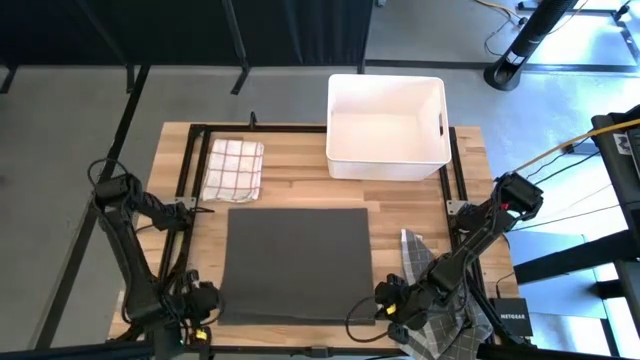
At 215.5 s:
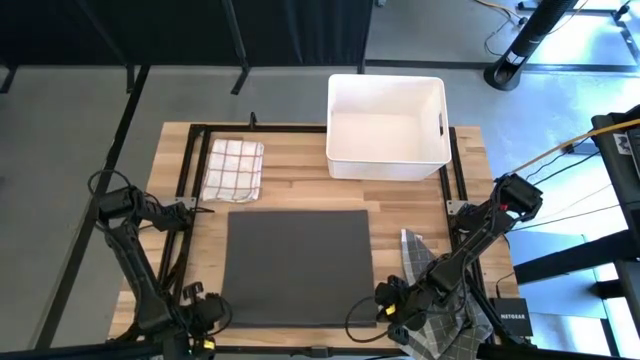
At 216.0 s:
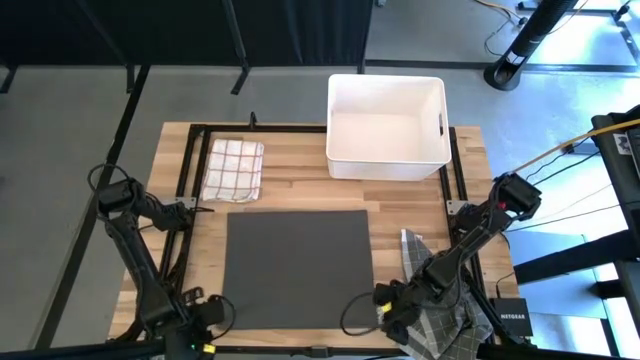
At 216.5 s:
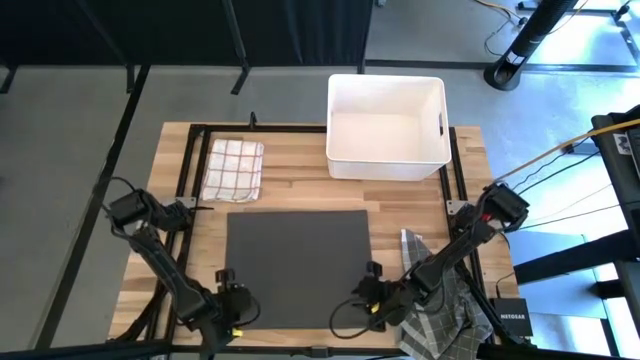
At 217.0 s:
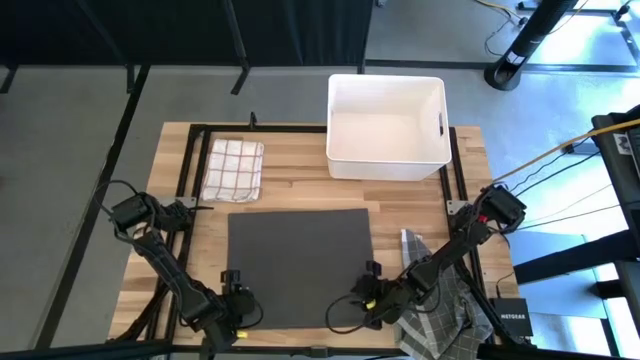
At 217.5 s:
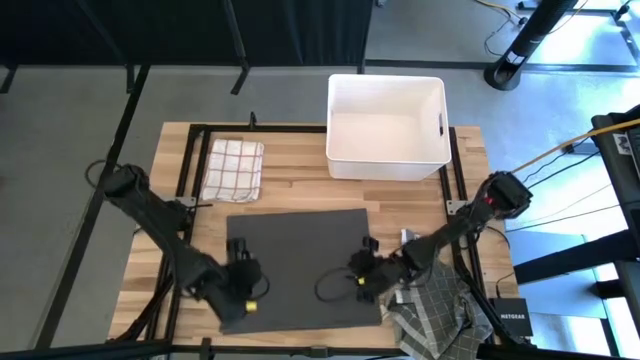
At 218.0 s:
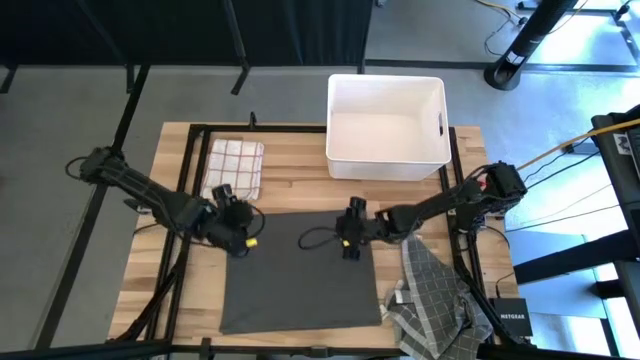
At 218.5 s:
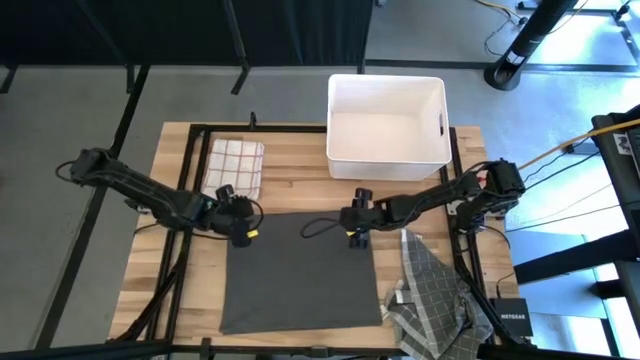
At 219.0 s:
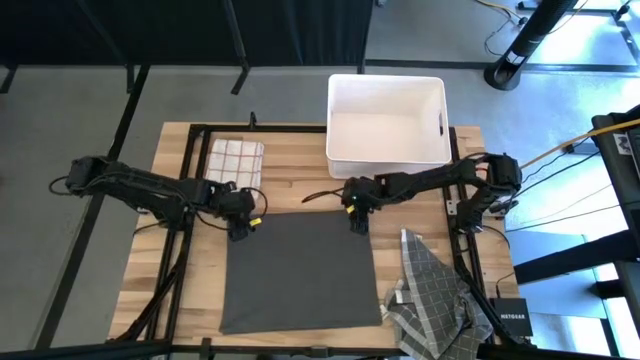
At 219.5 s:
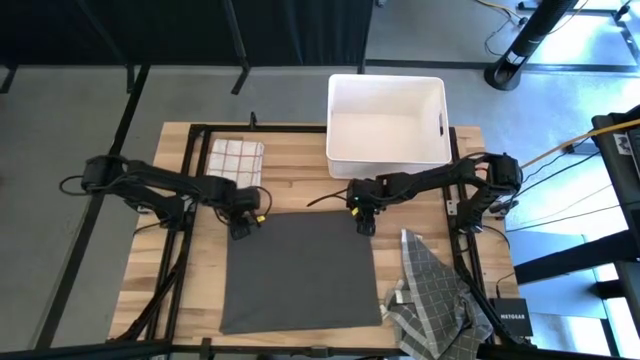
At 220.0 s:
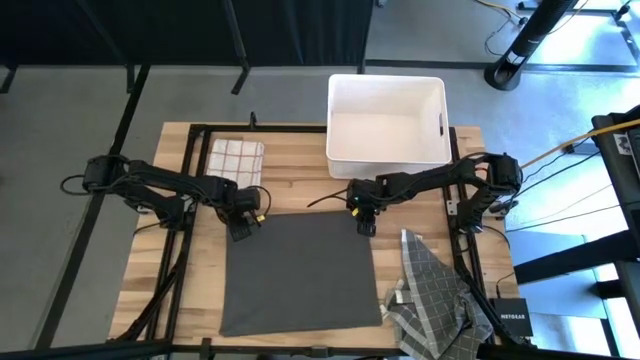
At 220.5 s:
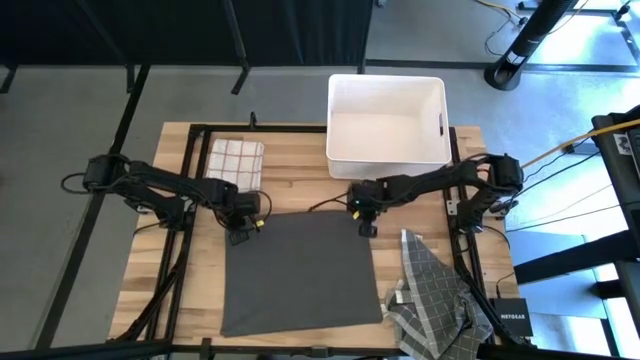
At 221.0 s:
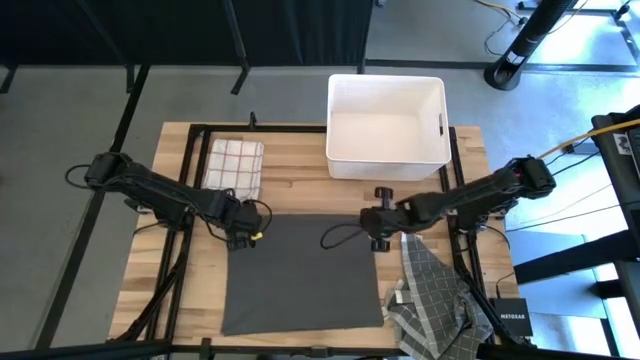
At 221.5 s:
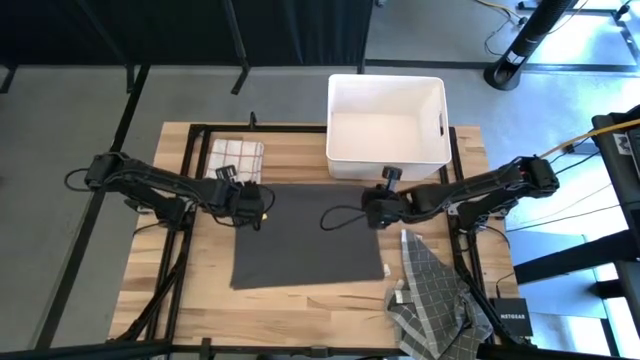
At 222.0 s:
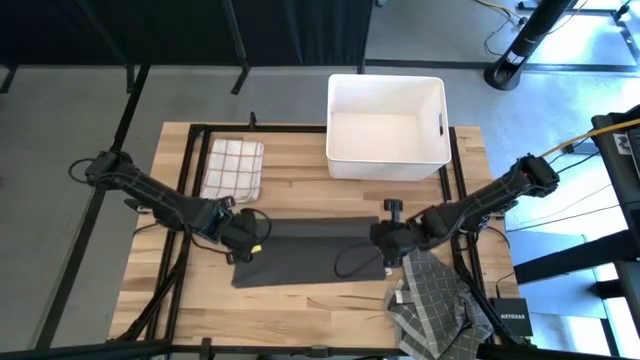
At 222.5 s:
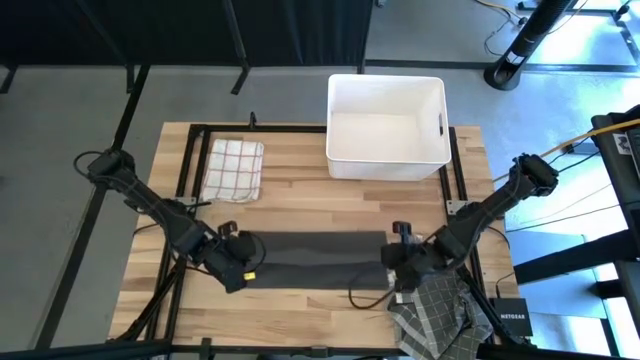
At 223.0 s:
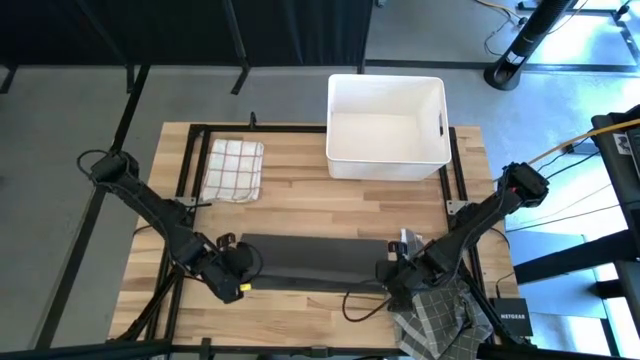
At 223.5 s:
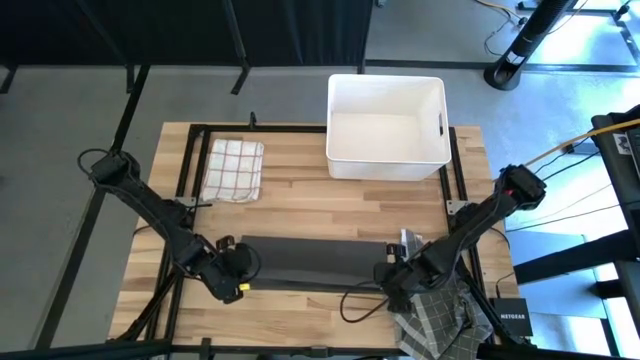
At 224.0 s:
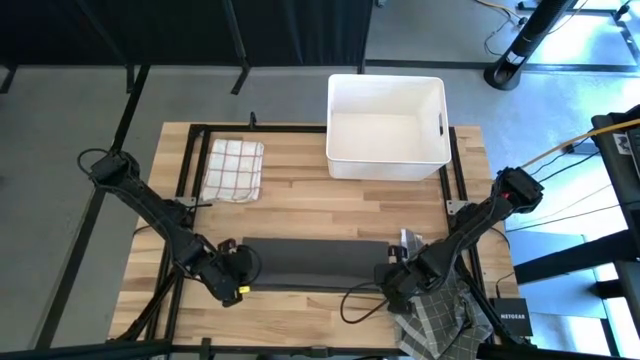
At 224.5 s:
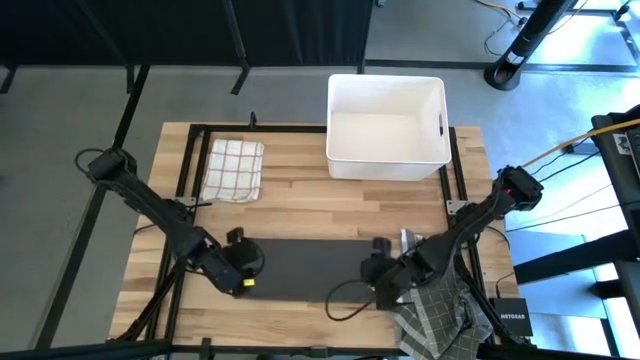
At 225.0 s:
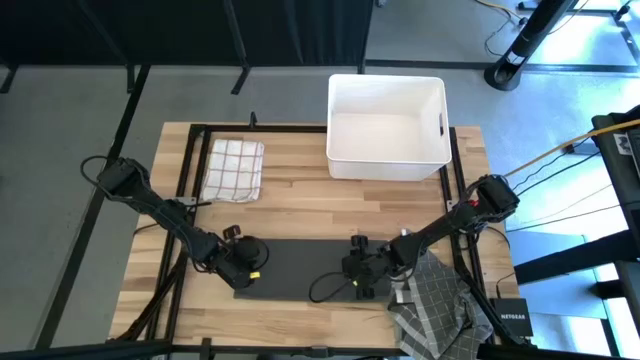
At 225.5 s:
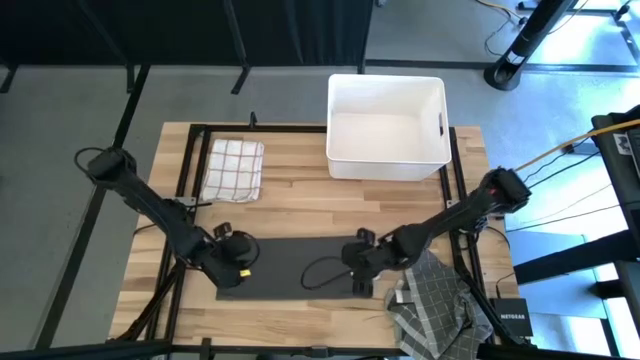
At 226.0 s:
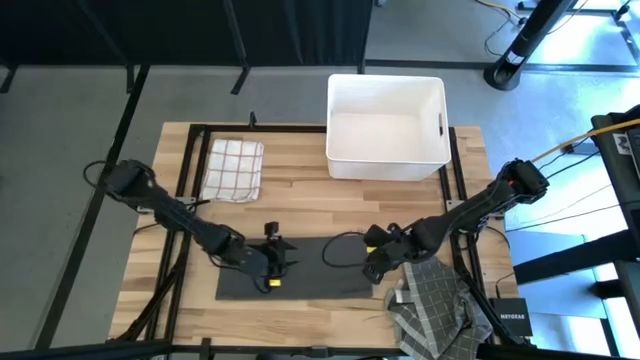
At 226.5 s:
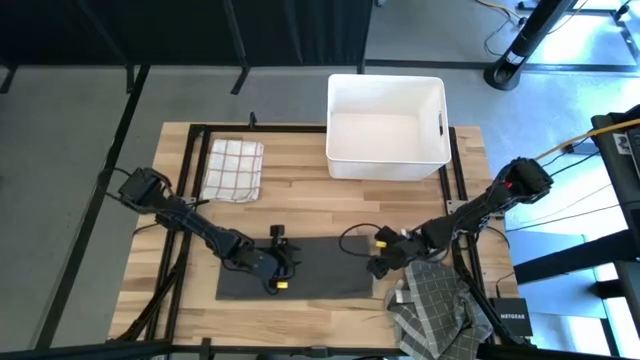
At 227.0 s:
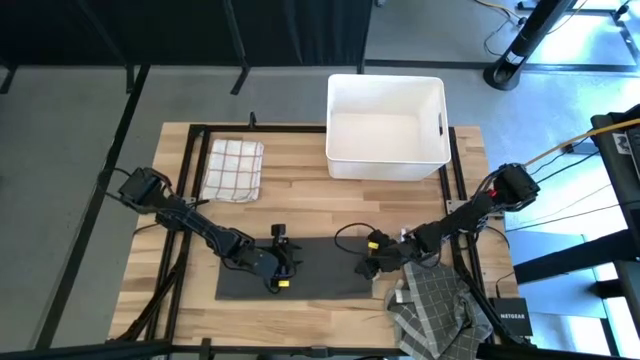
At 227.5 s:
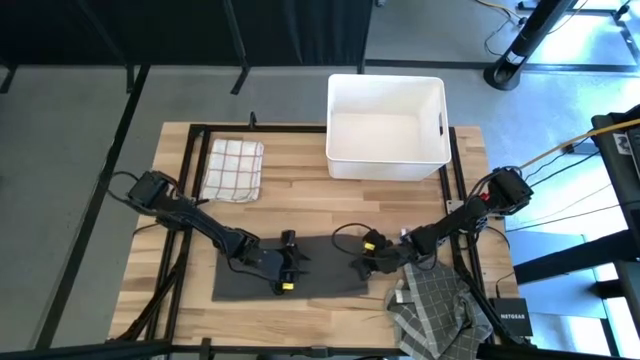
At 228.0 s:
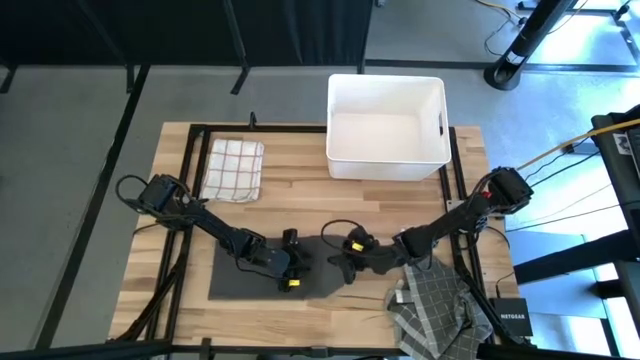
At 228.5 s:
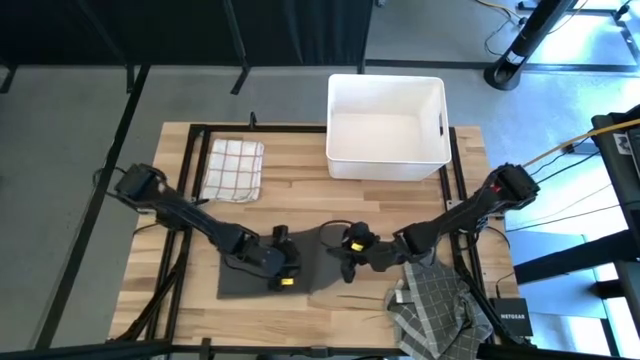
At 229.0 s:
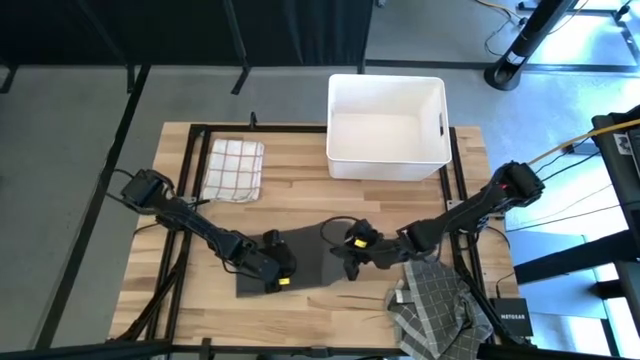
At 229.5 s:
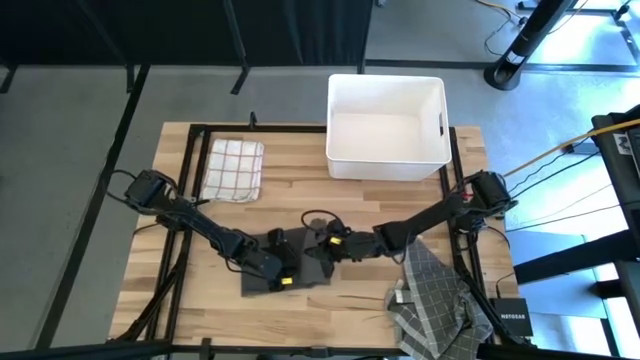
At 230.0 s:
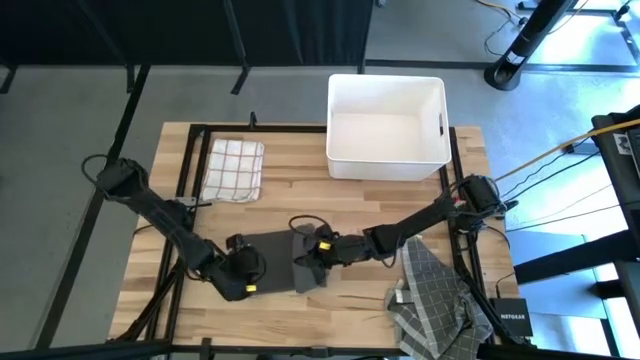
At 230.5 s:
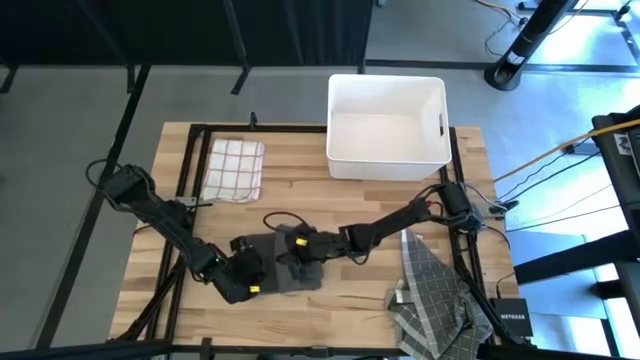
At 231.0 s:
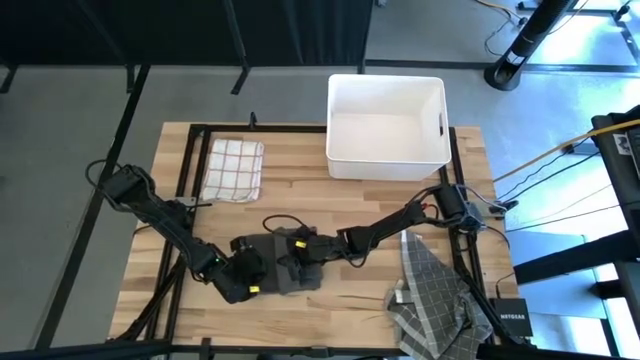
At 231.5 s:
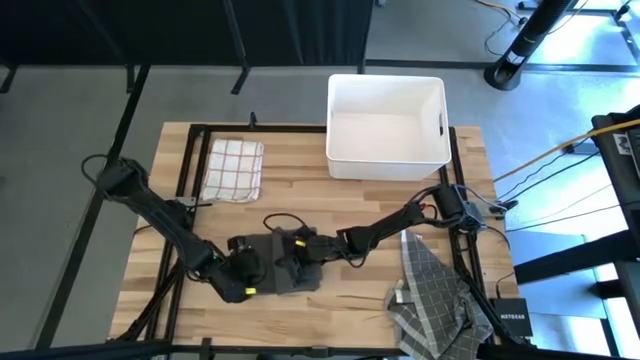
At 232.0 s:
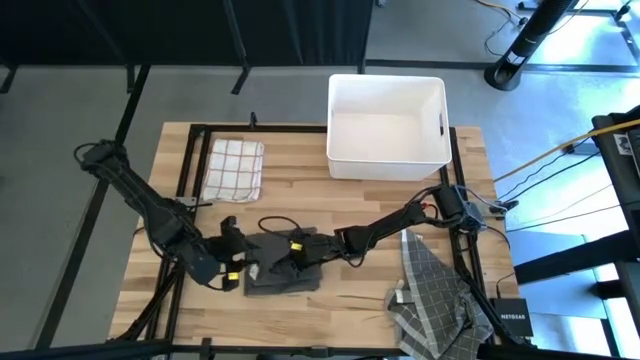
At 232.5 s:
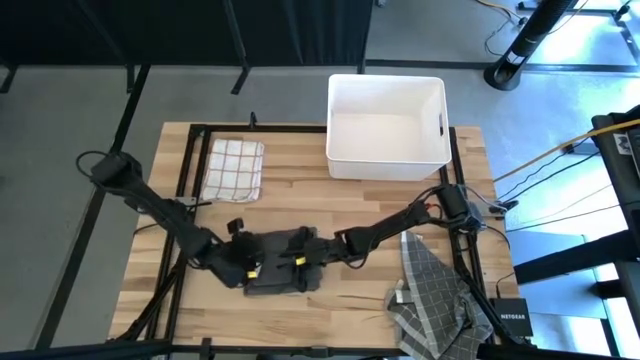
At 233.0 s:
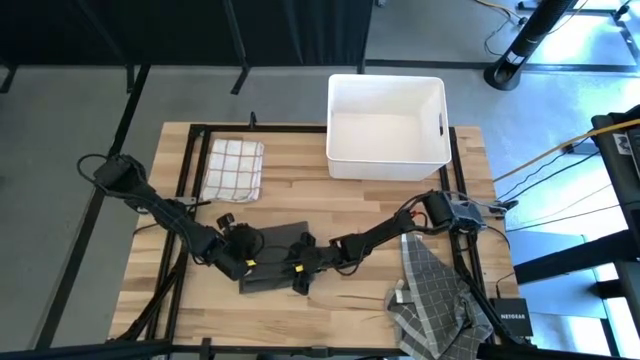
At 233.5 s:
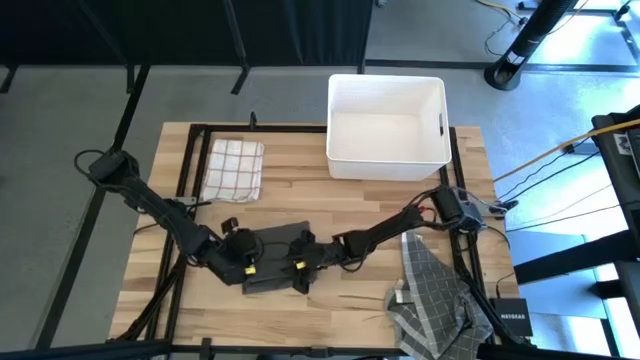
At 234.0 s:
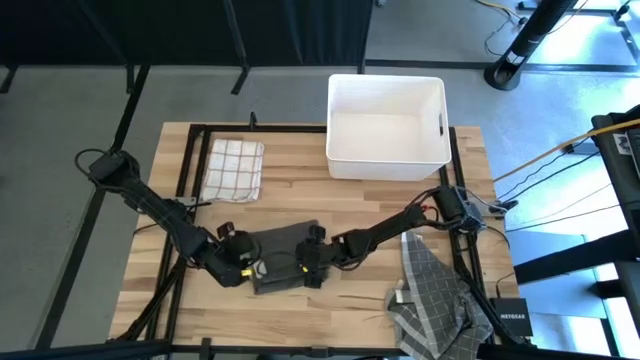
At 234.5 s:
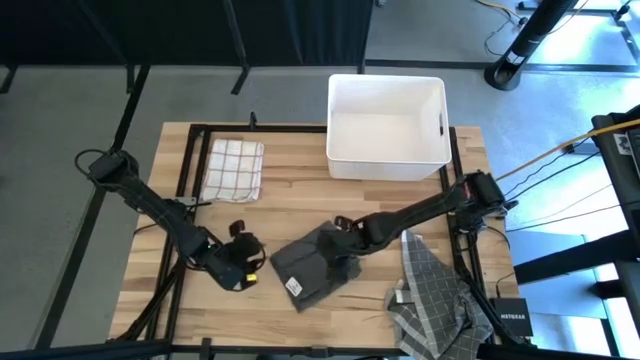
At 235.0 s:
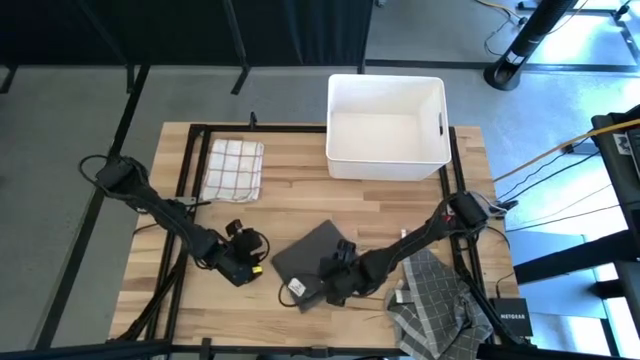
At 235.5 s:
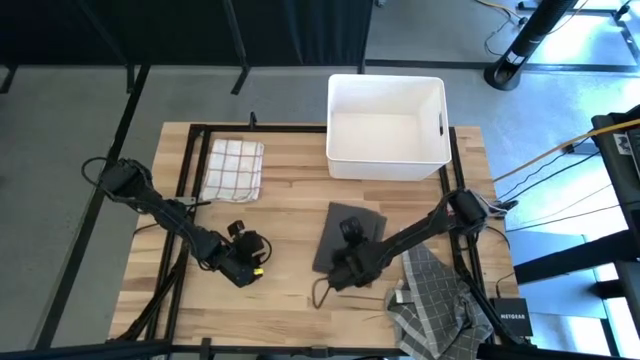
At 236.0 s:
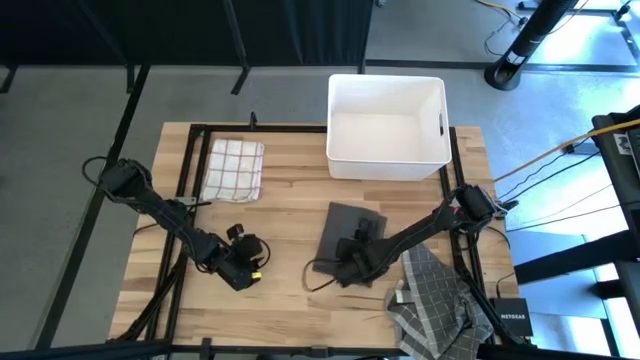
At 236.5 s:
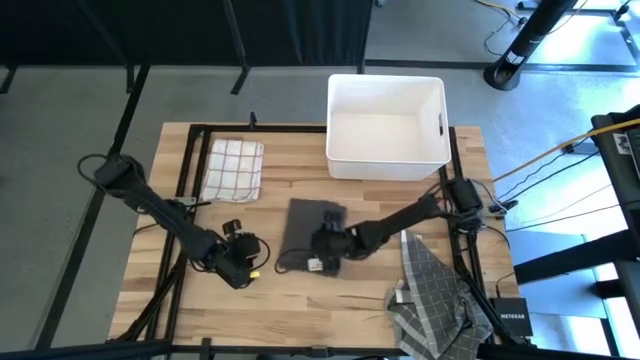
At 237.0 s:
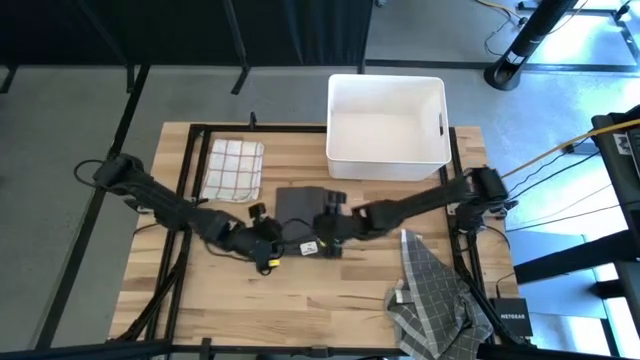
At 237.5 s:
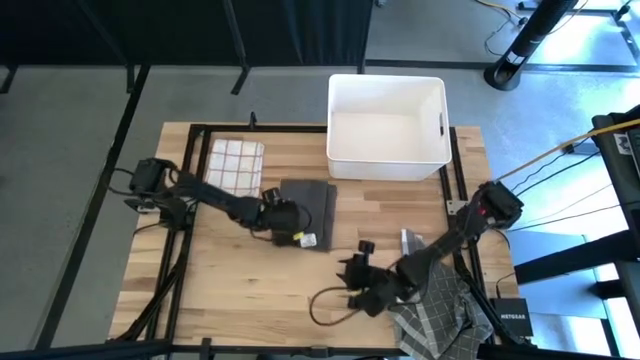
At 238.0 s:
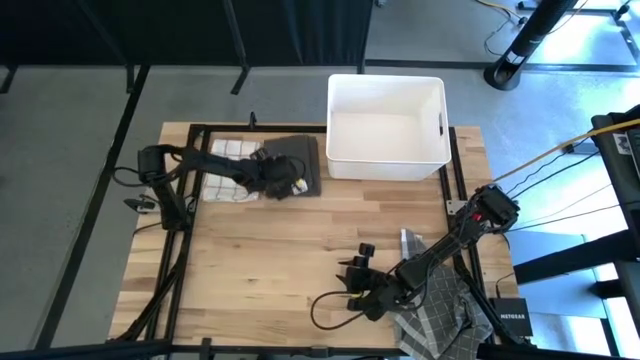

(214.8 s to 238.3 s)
Task: Fold towel
Fold the grey towel and put beside the white towel
